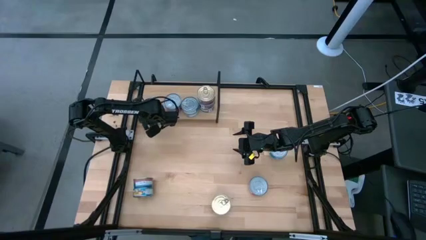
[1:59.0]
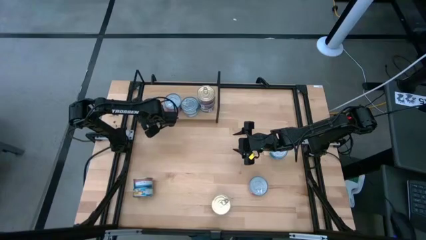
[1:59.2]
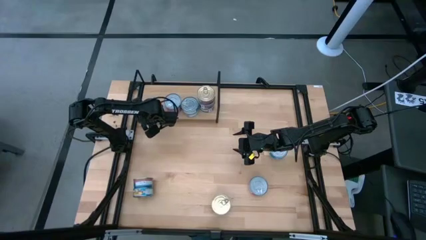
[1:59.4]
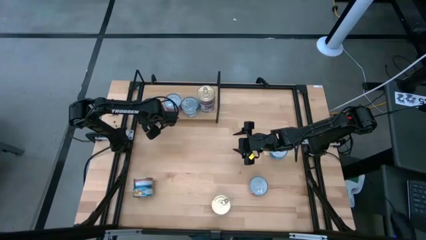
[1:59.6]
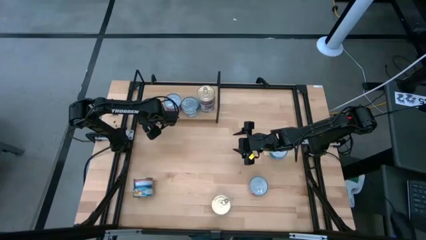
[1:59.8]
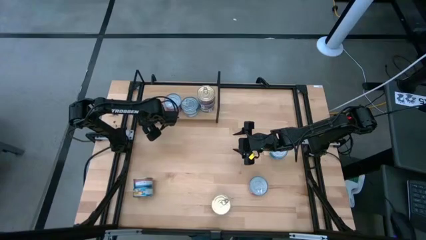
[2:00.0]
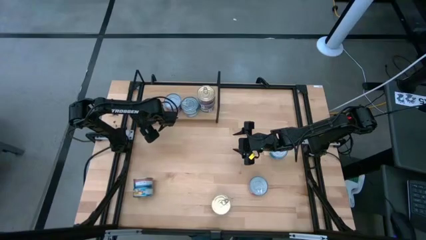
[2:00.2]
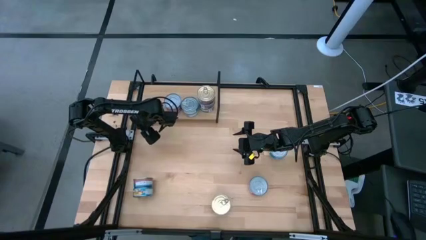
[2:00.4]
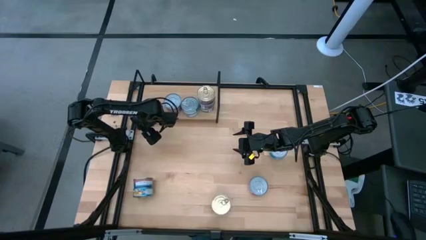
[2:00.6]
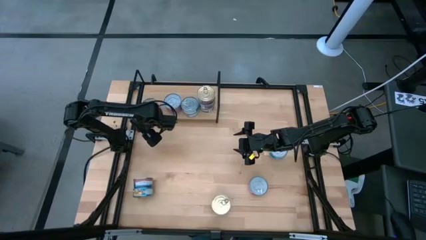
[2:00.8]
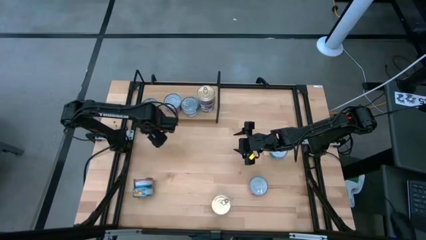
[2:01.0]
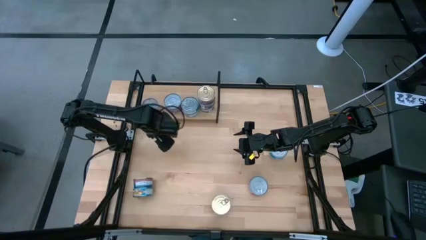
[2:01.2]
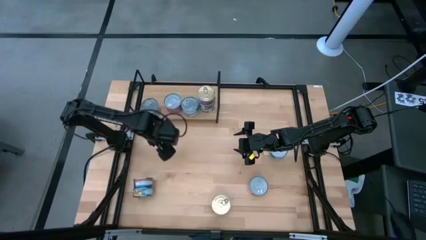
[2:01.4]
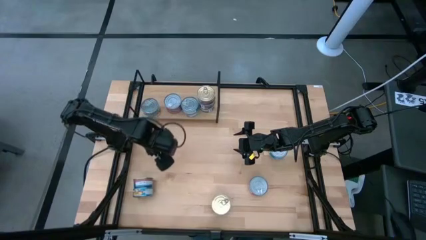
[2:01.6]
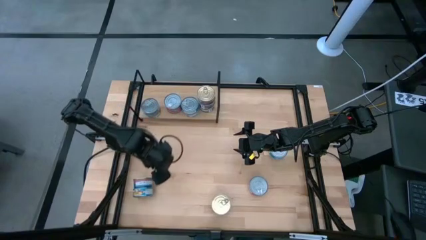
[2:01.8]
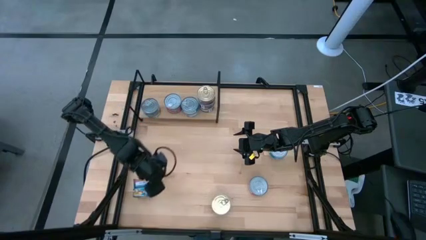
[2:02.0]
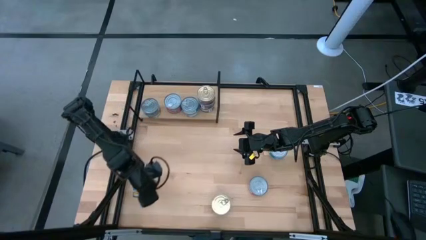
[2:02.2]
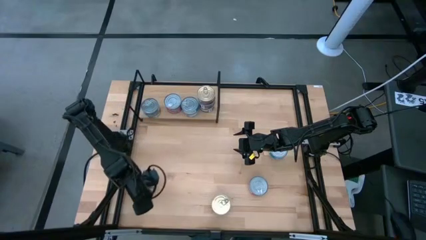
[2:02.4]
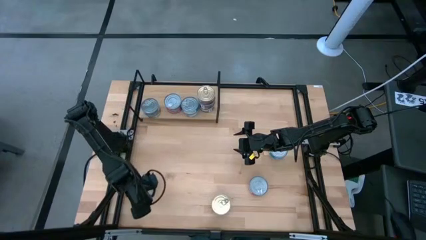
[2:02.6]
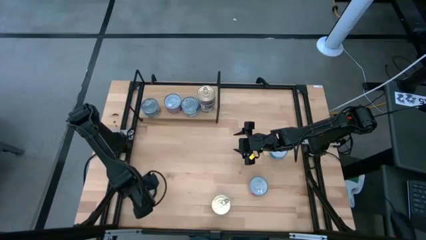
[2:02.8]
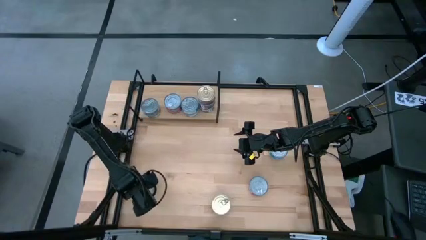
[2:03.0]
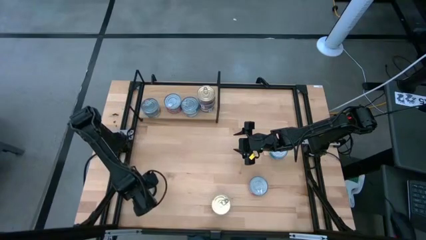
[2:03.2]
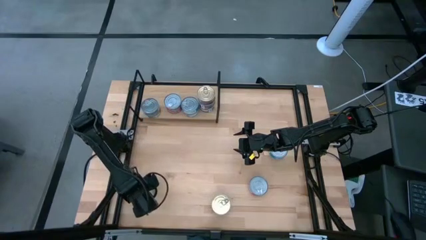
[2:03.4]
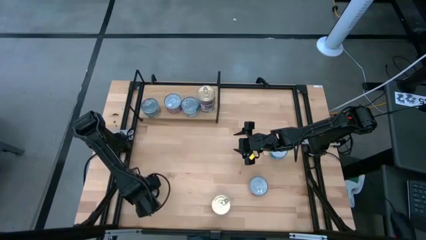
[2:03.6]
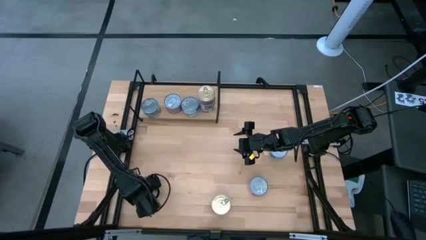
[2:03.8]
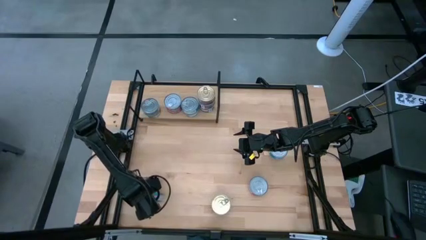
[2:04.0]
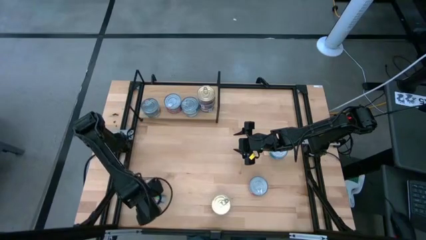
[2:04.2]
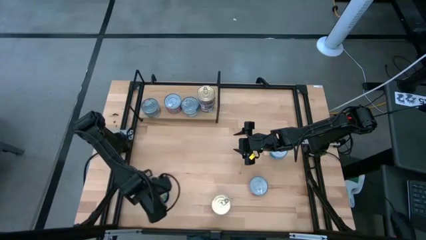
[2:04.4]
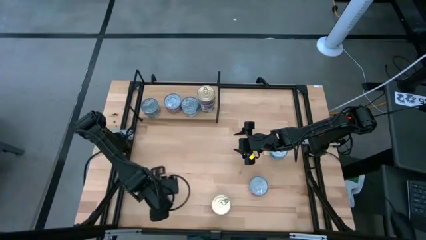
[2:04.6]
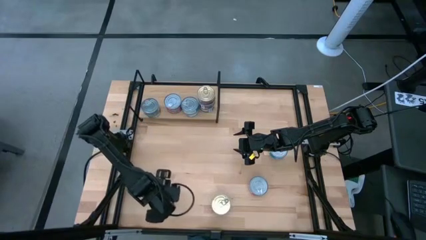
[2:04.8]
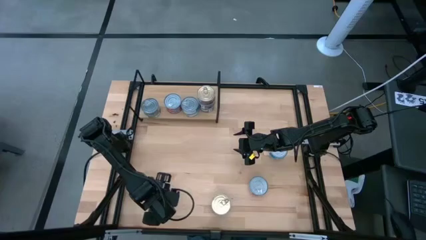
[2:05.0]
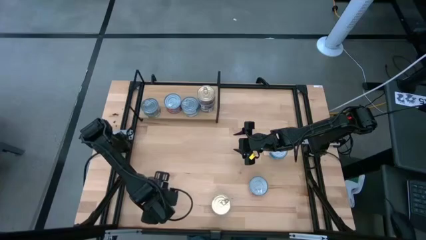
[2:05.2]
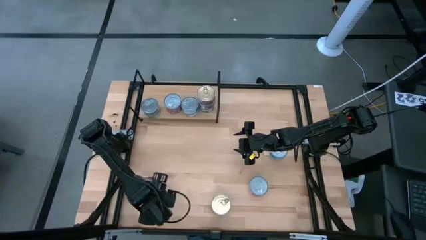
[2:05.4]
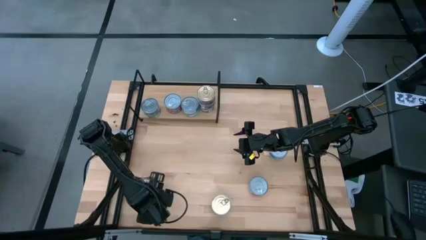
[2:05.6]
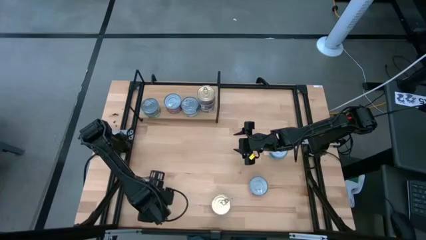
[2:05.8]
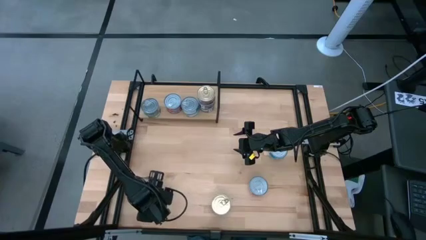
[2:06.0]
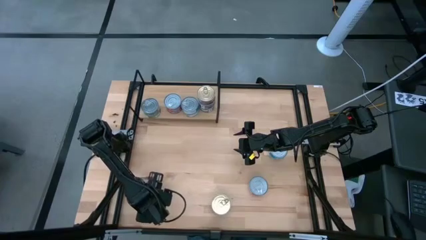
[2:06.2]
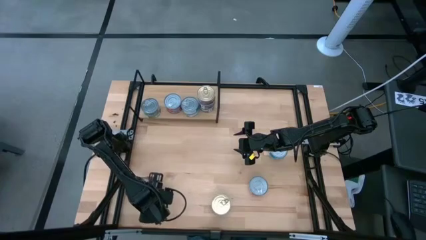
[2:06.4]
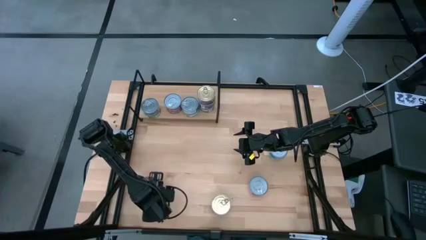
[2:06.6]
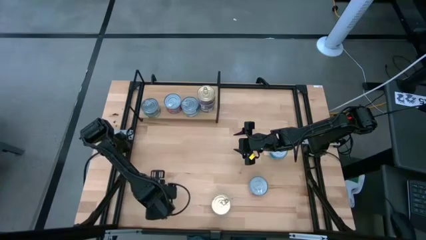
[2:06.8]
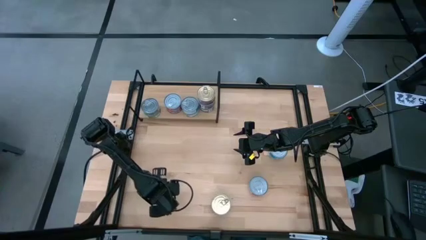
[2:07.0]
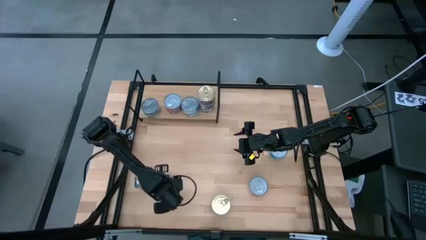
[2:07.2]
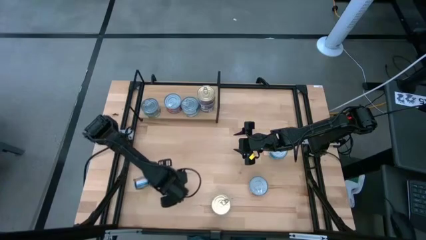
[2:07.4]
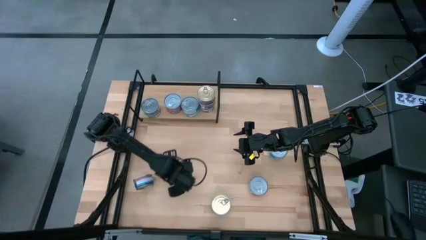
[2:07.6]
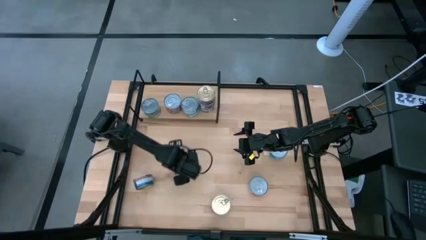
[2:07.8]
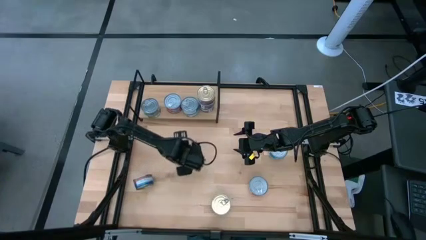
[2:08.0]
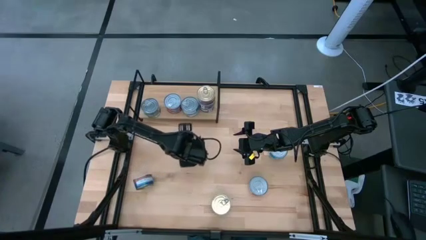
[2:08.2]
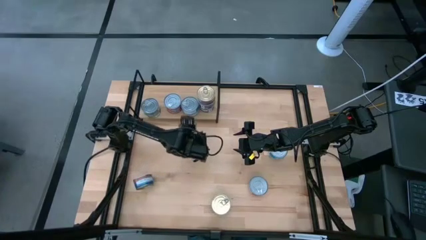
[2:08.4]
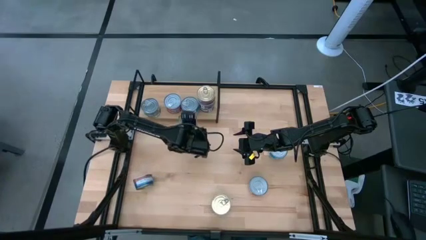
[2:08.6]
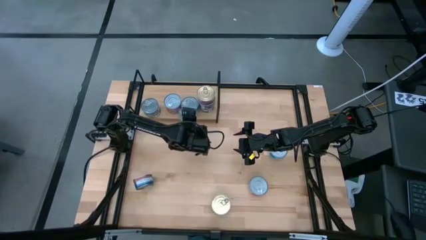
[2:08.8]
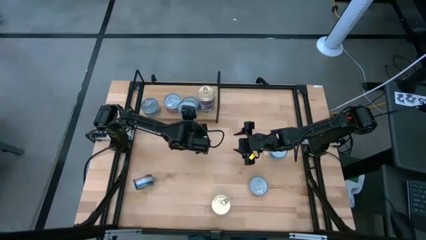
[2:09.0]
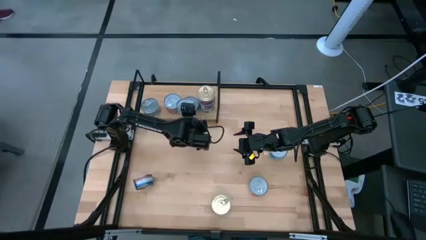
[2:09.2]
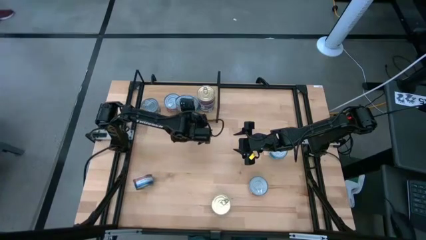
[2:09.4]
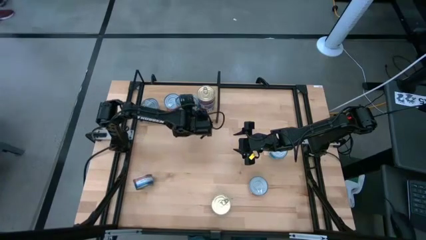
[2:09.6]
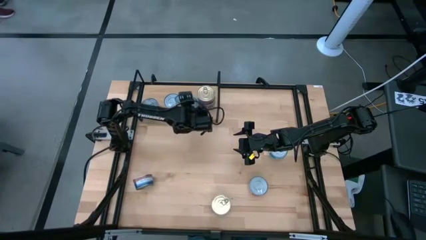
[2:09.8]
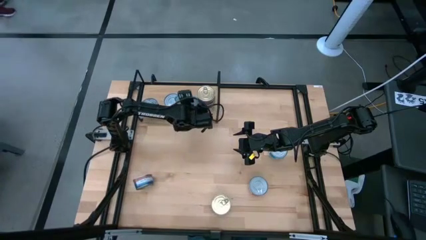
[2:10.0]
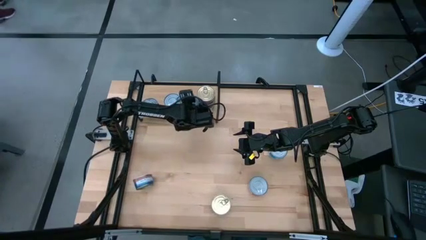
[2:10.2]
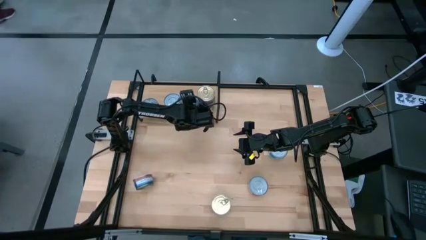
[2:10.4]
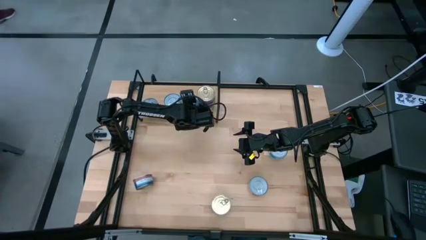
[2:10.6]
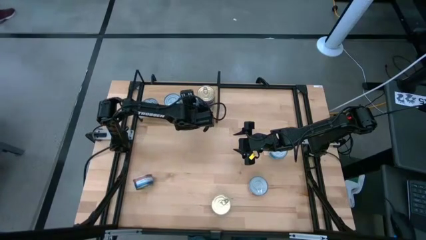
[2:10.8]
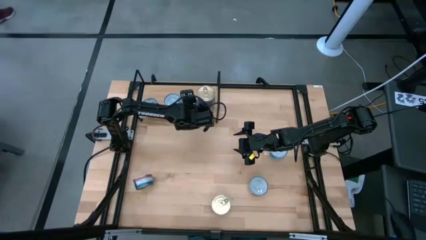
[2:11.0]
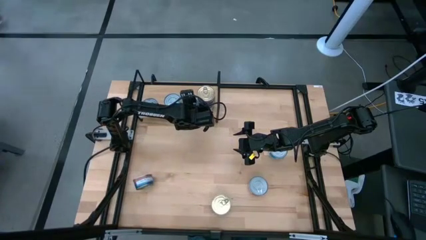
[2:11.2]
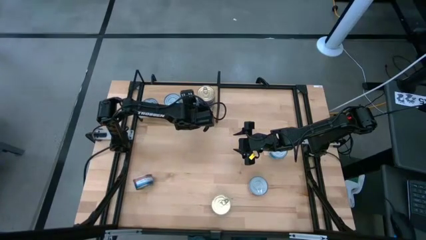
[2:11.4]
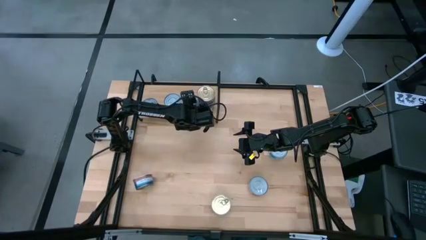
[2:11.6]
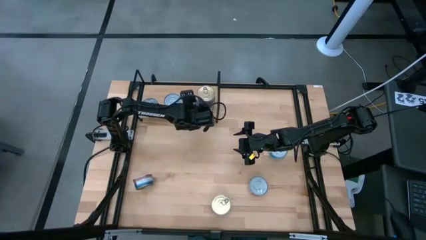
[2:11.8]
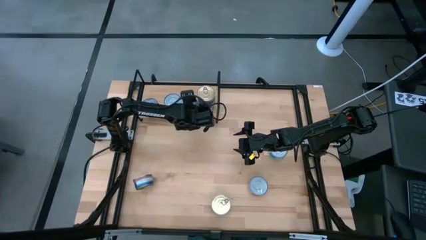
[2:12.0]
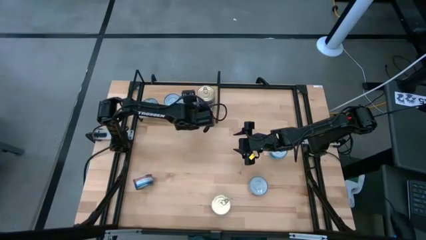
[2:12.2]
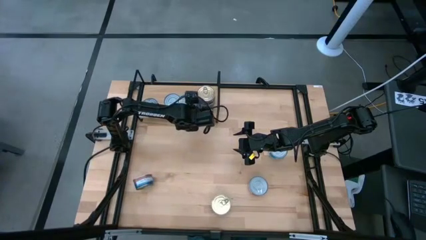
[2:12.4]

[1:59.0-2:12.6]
Task: Stack canned seafood by type on shelf
Stack the yellow blue tuna can on top of the yellow blue tuna can on the shelf
